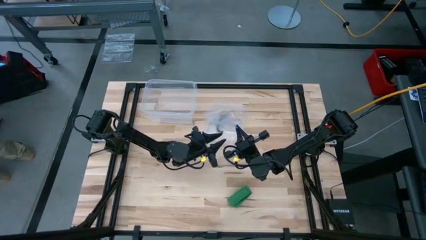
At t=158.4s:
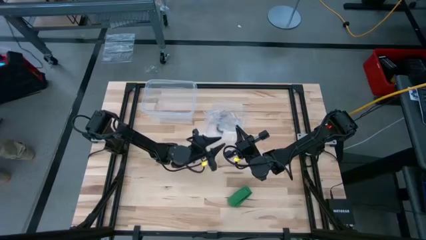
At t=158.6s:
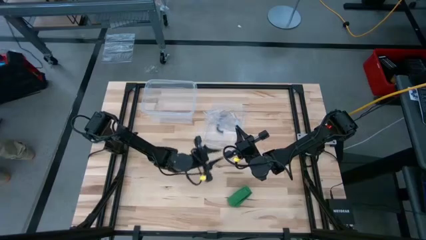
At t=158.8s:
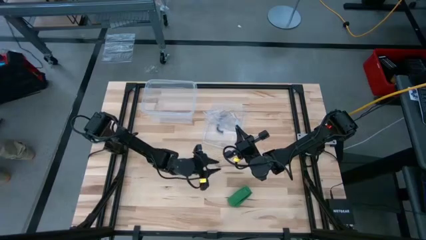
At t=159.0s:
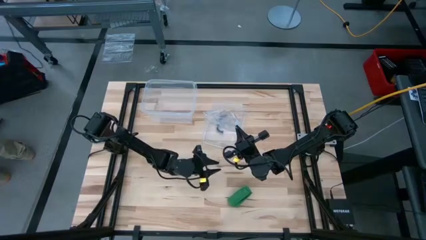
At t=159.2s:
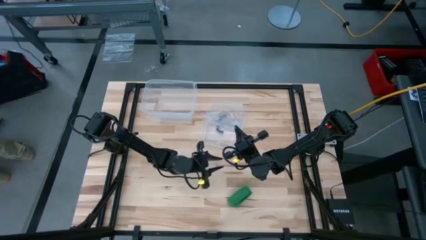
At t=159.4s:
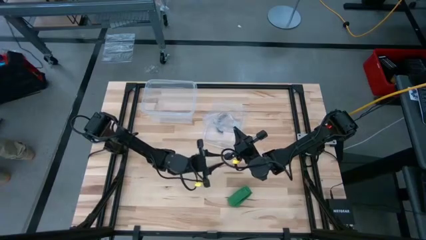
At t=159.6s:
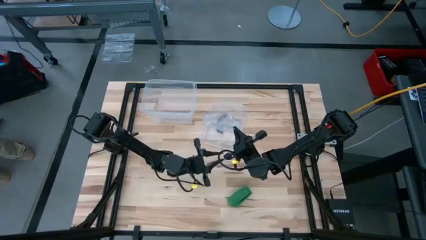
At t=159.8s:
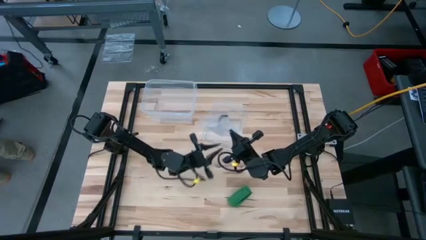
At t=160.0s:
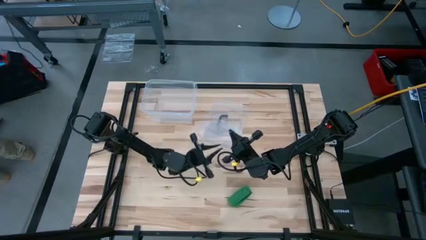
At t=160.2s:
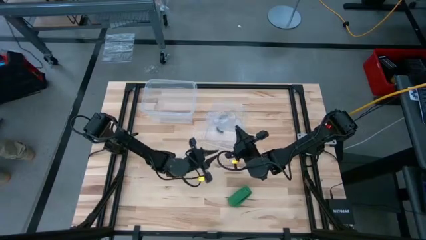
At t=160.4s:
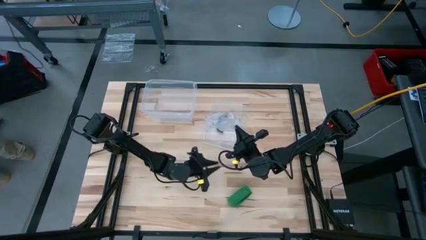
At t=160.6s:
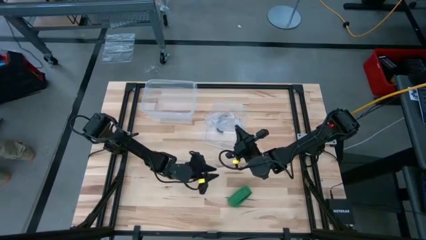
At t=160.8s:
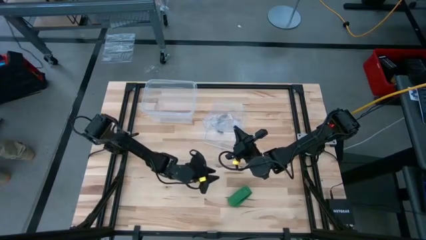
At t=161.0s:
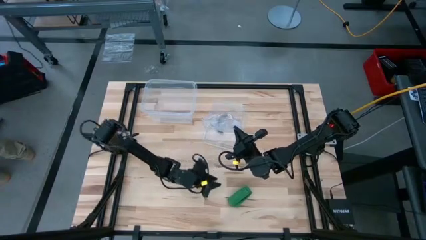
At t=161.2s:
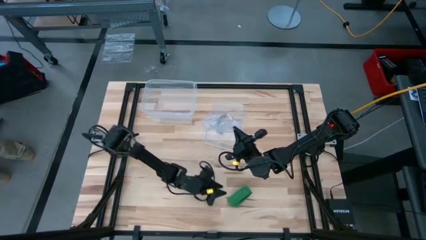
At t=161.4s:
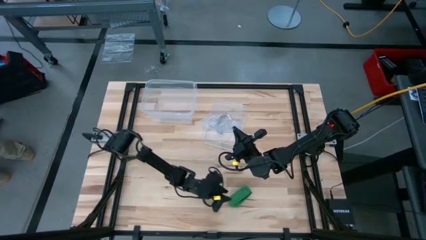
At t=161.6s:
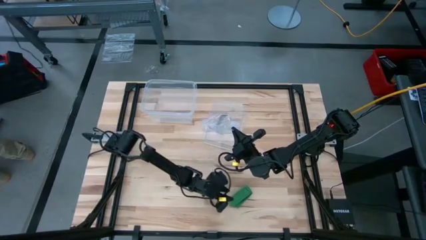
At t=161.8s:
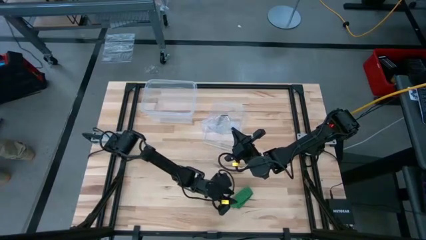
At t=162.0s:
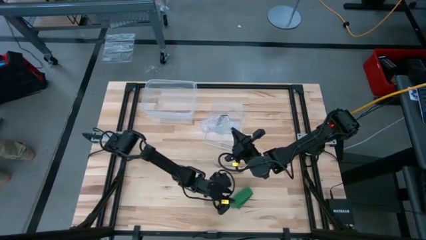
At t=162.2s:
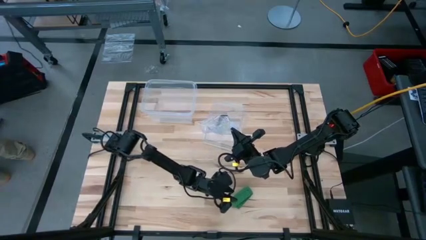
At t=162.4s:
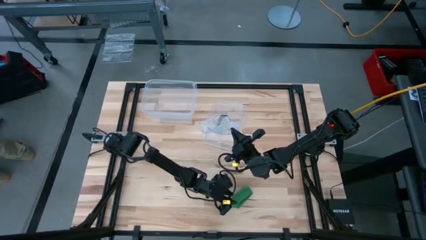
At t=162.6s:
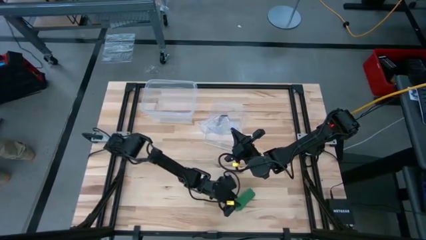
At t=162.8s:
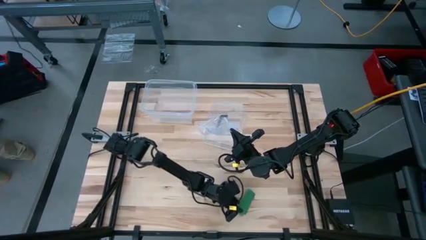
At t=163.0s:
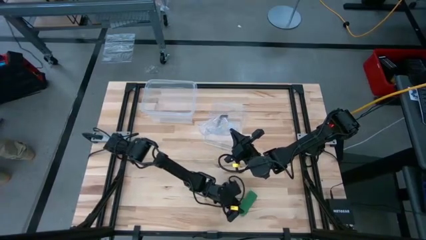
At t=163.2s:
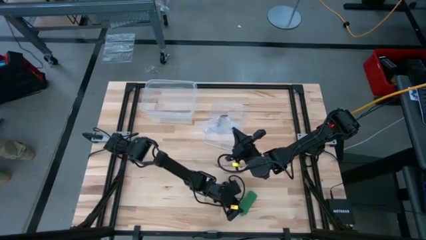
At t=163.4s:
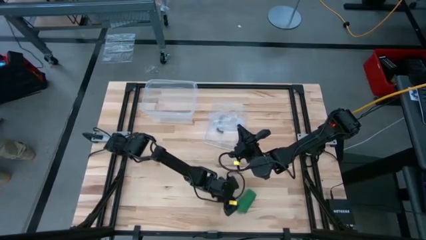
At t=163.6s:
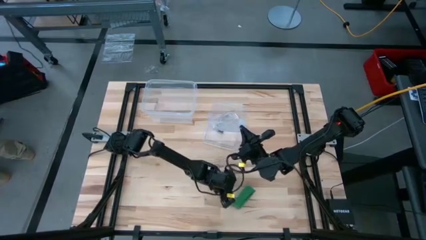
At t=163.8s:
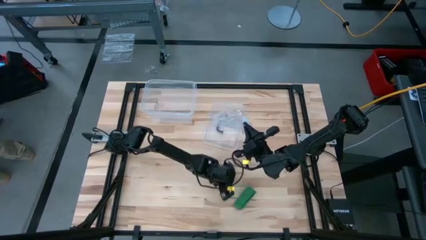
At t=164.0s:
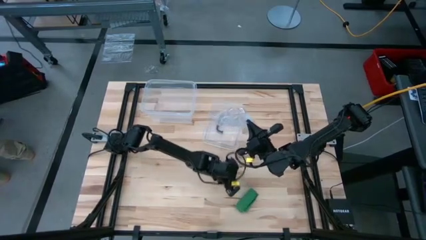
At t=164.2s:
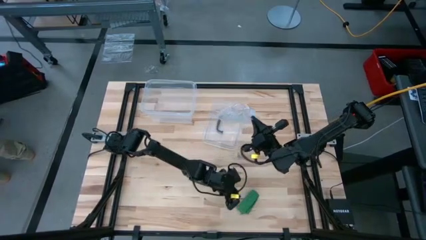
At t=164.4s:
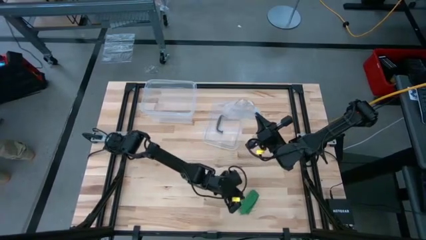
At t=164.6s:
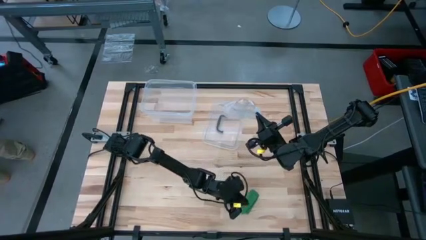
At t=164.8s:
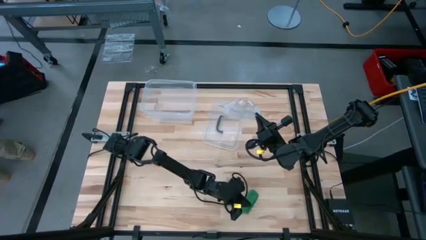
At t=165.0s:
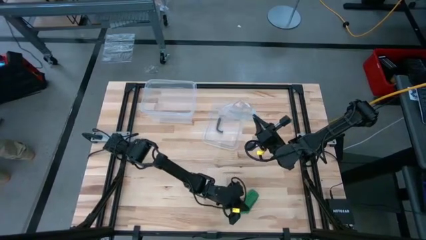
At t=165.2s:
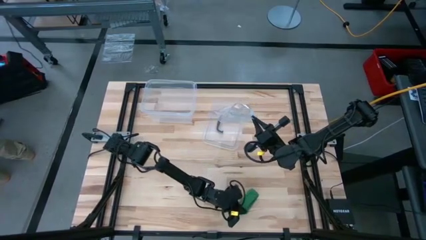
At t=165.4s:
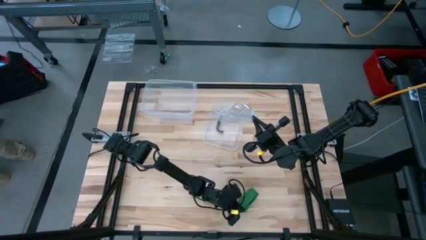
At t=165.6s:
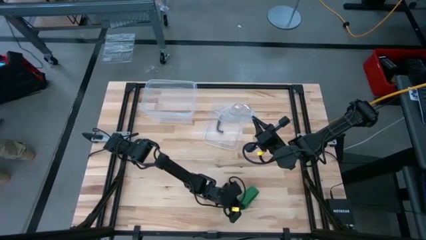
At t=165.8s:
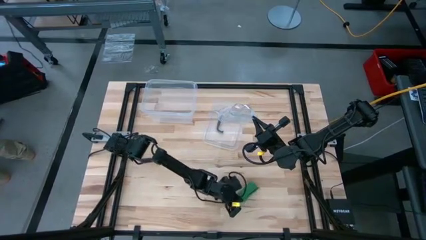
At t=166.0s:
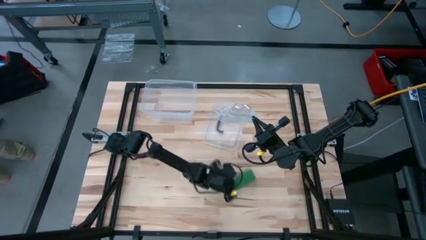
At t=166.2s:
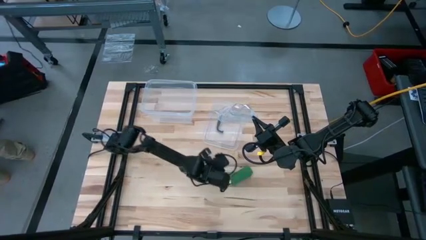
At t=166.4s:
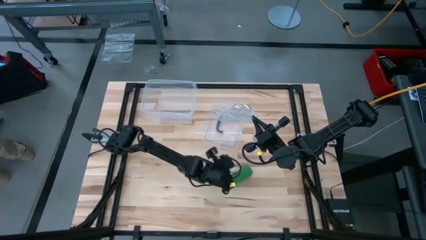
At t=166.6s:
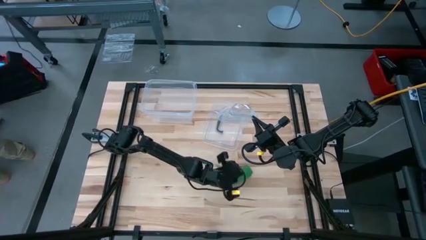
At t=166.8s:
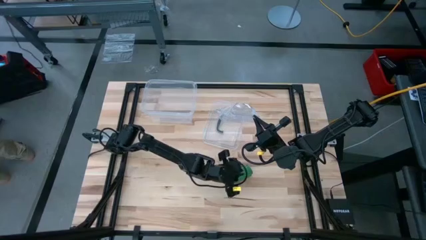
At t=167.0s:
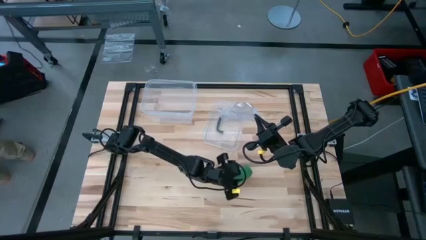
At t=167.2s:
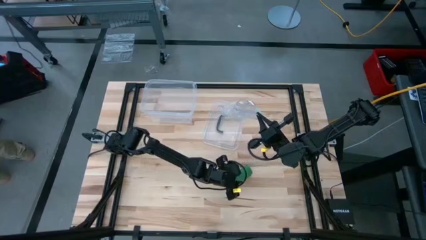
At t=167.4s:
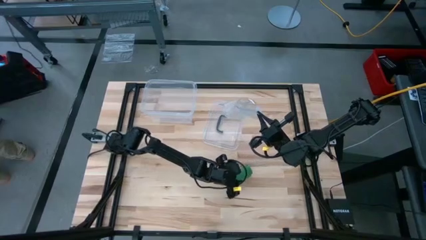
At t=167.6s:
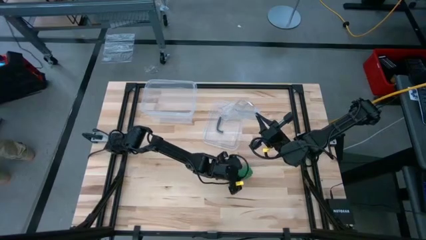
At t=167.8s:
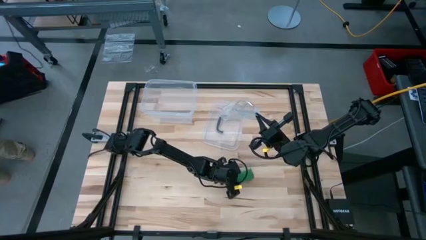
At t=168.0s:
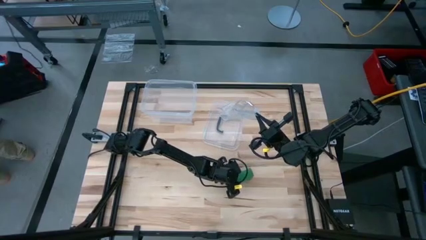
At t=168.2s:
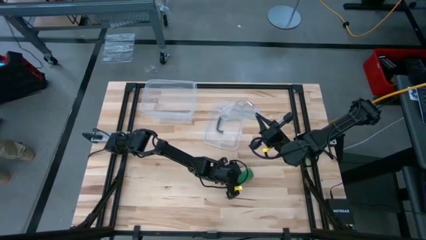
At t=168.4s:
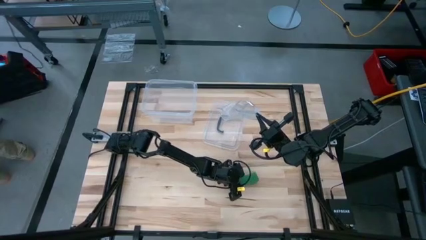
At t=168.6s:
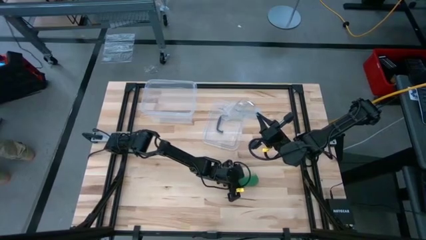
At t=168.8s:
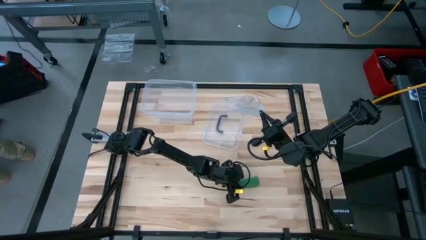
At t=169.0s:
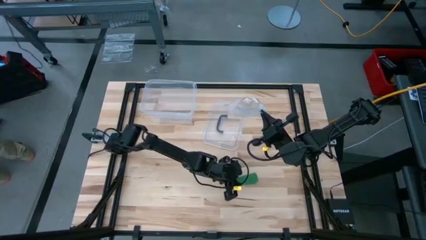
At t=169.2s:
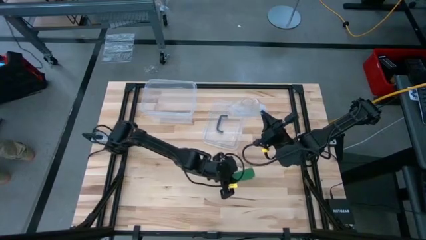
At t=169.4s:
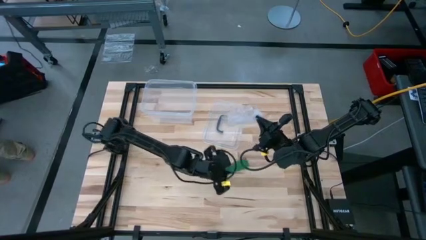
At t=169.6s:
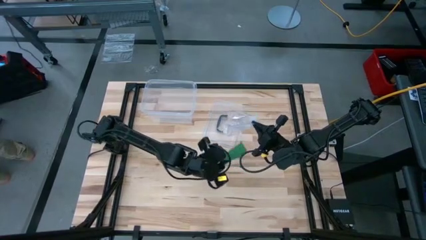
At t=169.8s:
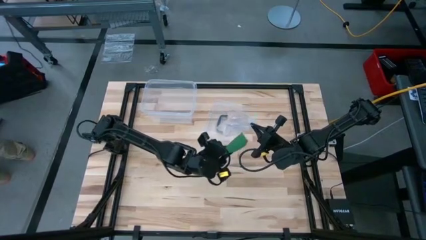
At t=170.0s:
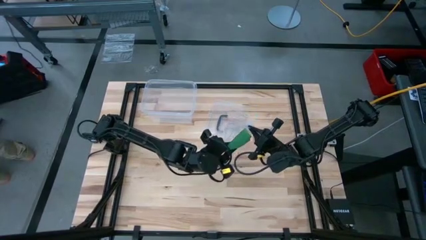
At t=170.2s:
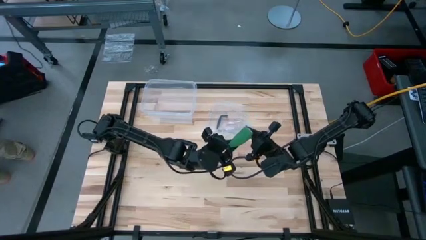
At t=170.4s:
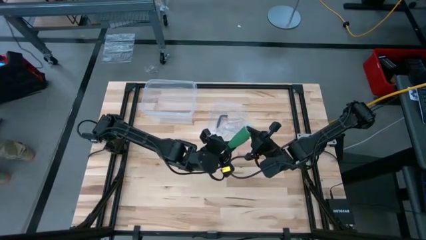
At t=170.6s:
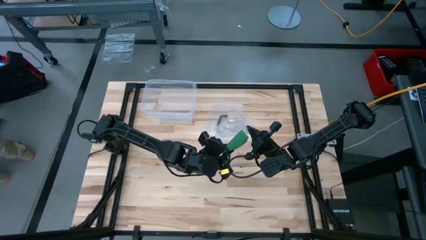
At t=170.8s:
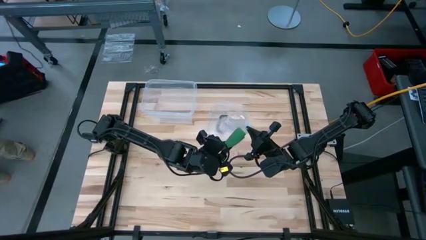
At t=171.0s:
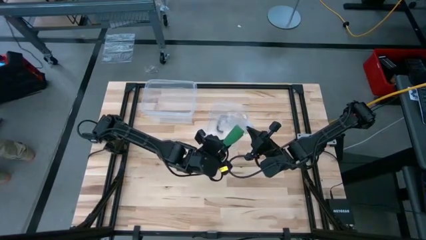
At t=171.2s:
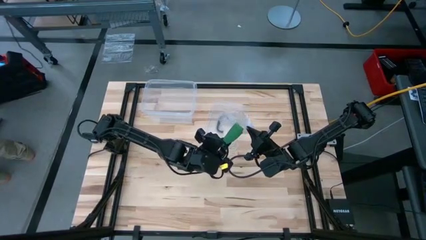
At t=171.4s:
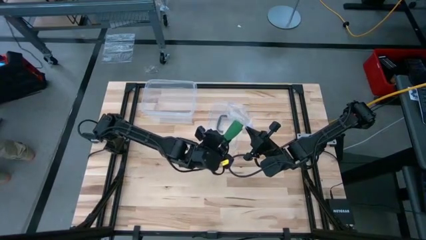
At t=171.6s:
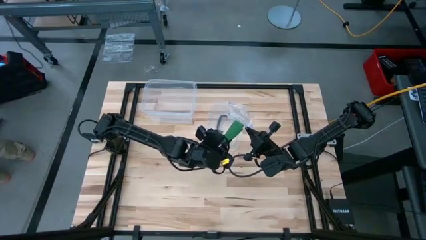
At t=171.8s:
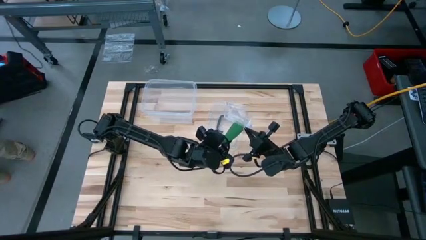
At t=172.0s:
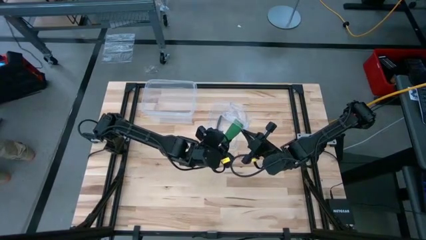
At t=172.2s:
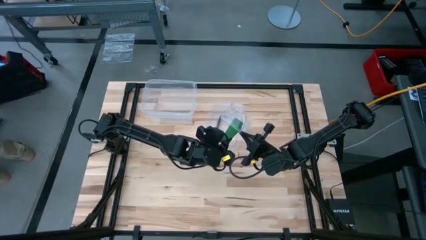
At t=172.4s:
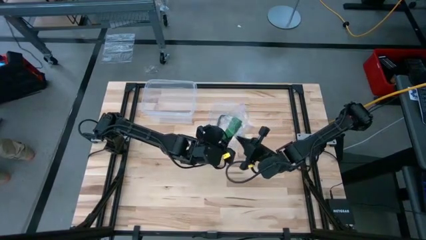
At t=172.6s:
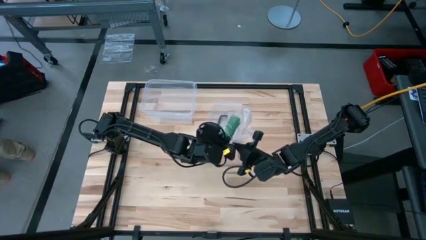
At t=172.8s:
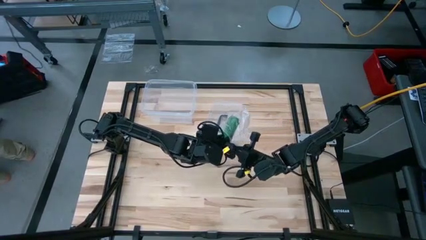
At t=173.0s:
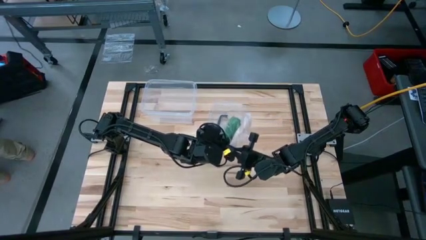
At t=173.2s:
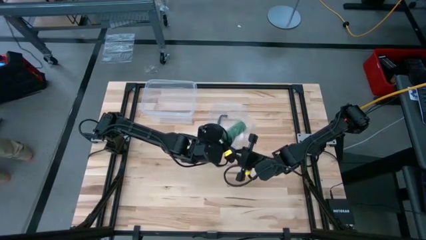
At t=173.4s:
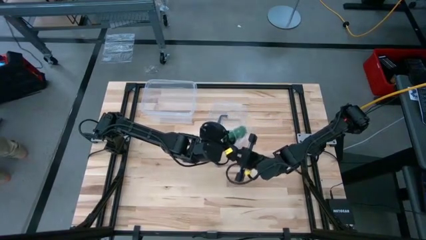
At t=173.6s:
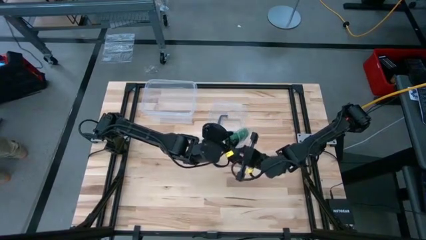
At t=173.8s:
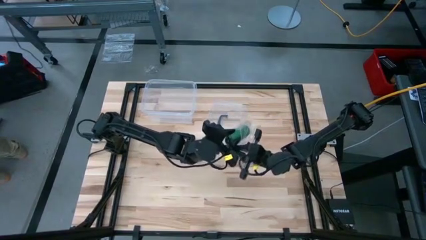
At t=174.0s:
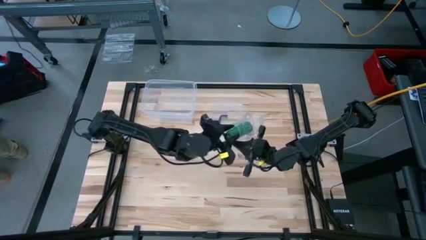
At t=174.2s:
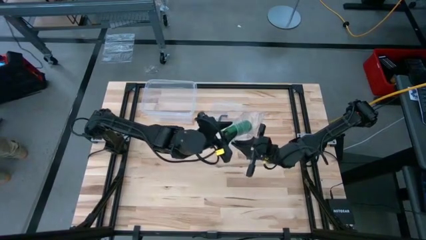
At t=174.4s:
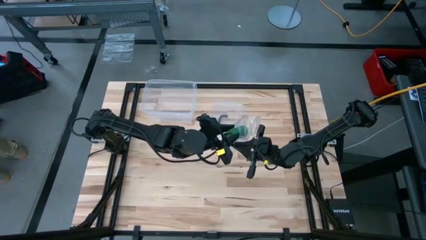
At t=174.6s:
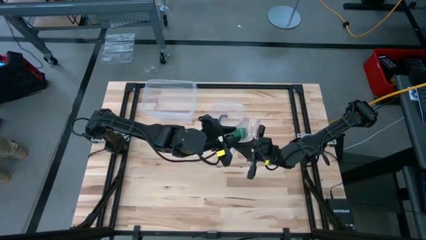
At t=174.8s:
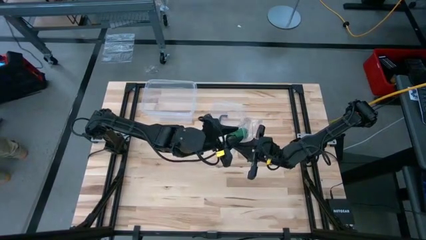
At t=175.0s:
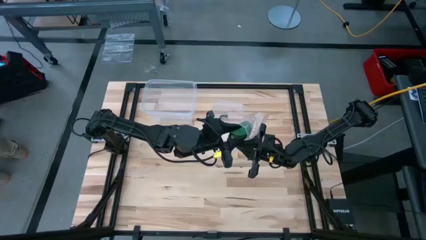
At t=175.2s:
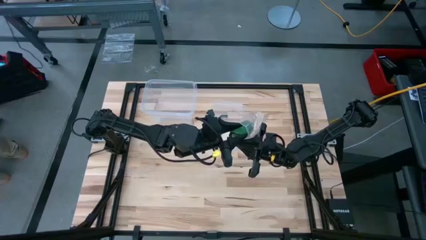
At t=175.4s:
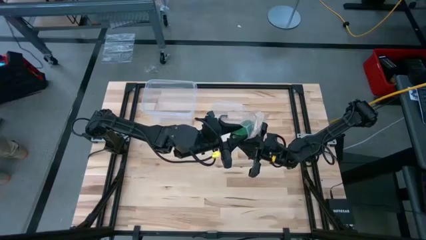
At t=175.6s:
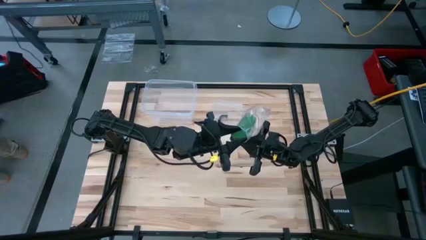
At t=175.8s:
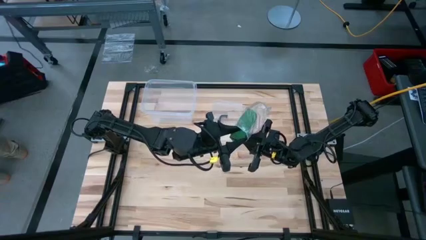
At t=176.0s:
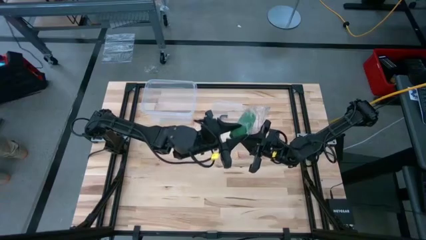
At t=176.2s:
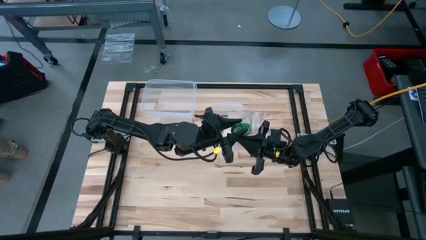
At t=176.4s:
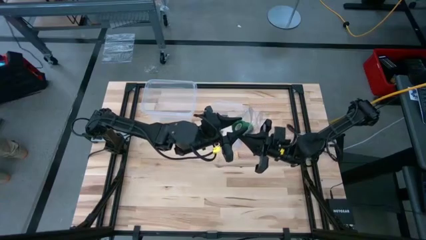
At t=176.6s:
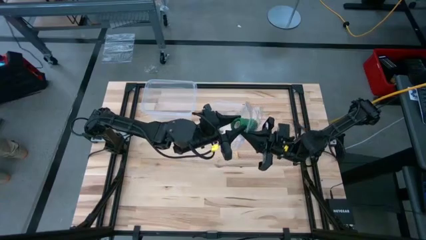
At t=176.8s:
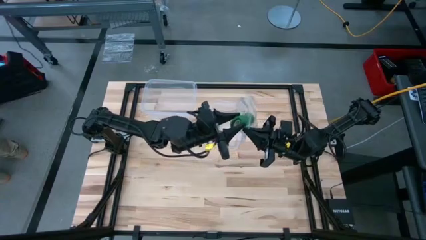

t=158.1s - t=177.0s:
Task: Roll bandage
Put the rolled green bandage into the transparent zip bag
